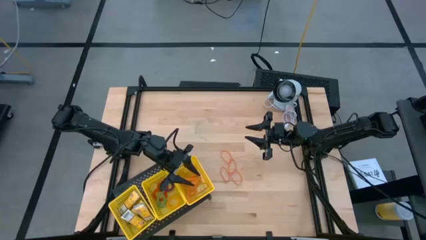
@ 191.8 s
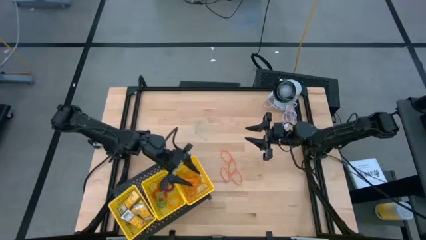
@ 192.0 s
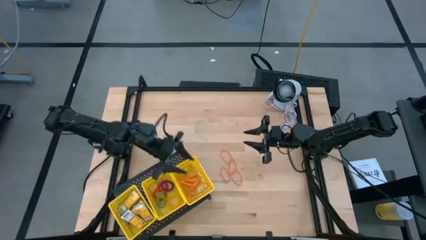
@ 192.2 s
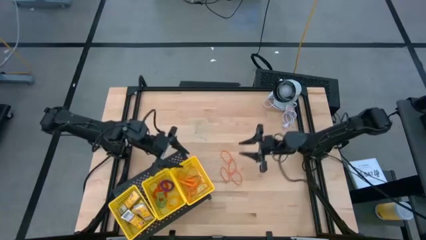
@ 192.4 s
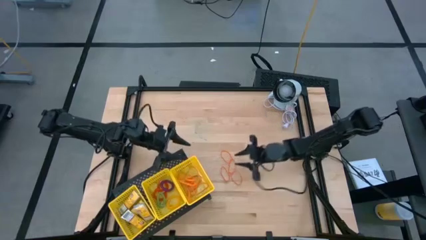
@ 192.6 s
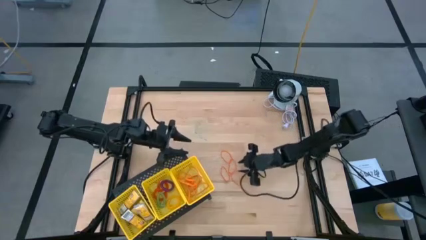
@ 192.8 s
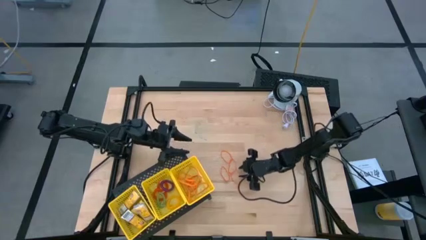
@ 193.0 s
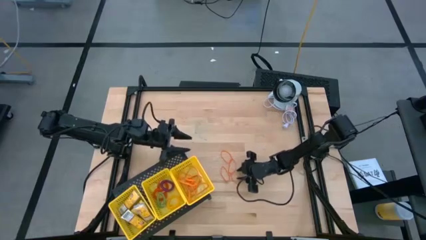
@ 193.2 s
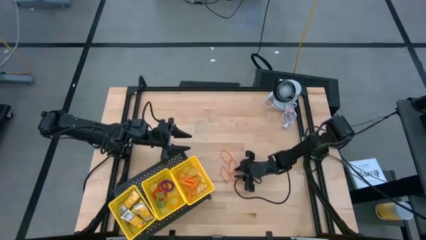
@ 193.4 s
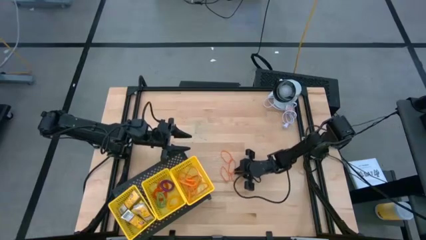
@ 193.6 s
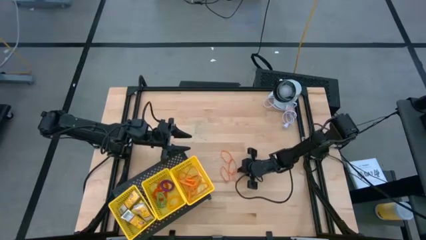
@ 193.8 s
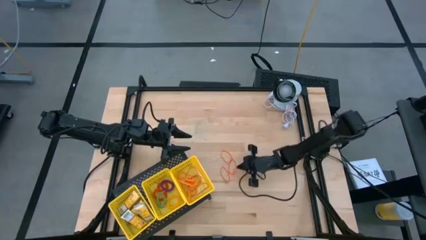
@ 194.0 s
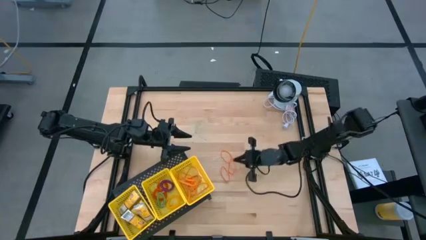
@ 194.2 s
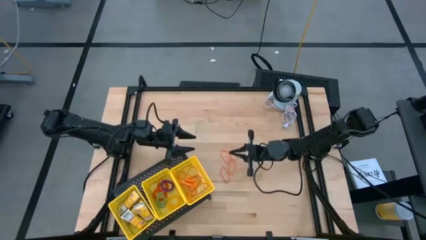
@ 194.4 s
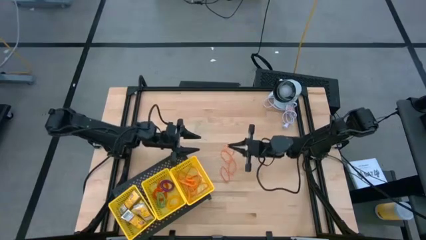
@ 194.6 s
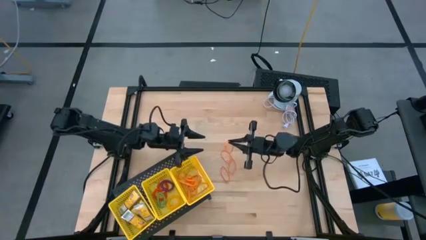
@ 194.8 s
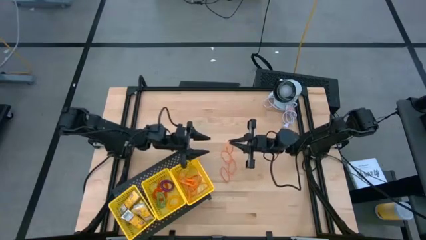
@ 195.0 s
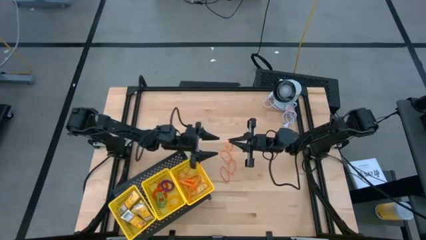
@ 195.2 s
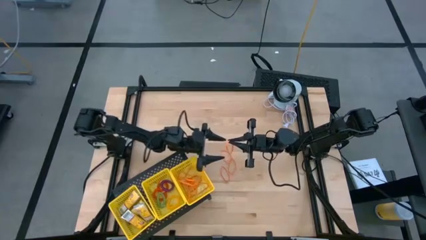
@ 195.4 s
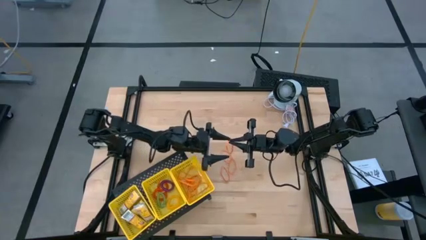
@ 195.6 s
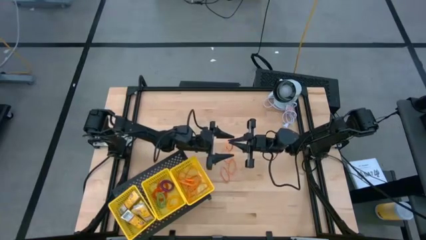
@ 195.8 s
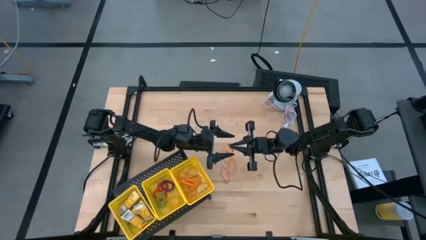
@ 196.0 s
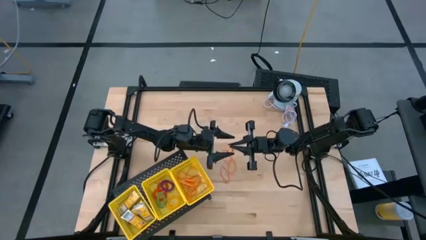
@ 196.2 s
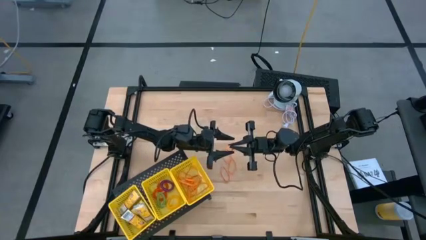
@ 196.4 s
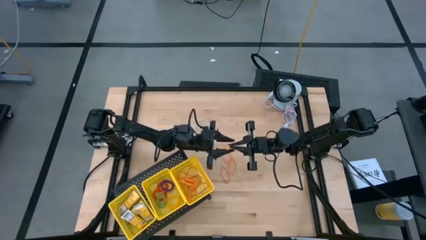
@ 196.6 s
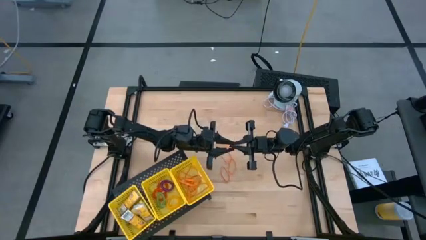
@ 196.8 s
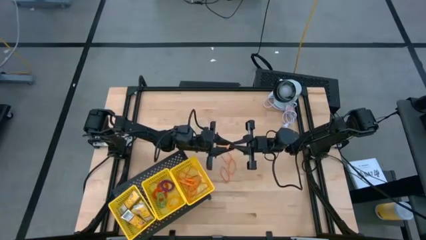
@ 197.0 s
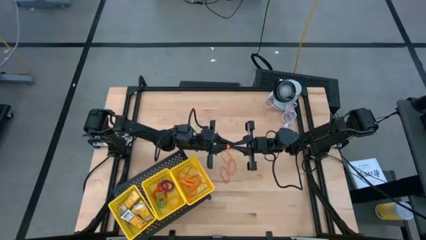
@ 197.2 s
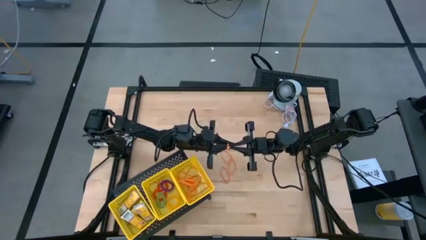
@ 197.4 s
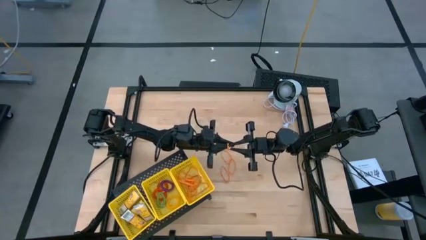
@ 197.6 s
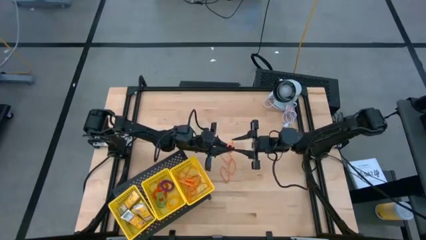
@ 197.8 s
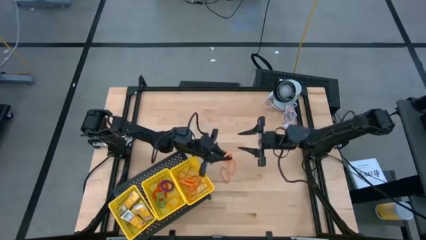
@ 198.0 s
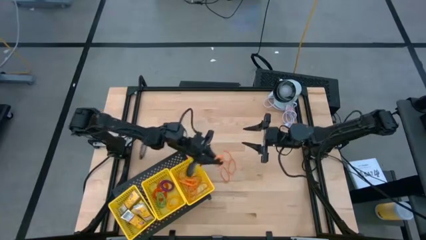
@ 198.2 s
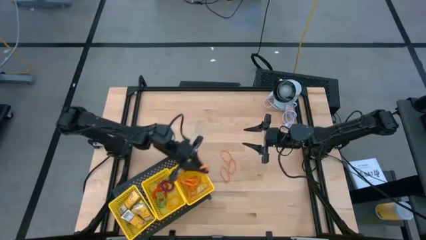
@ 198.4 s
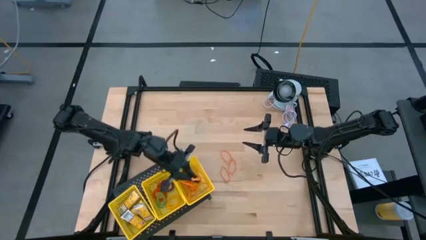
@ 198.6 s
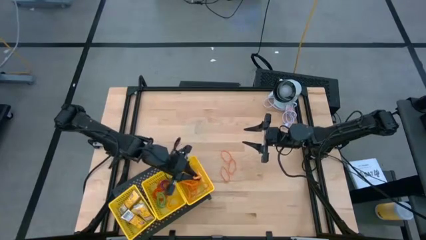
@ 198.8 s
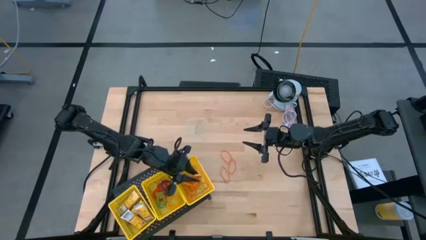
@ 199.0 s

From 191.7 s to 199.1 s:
Task: Pick & Place Office Desk Supplies
Put the orange rubber band into the right yellow bin on the shelf

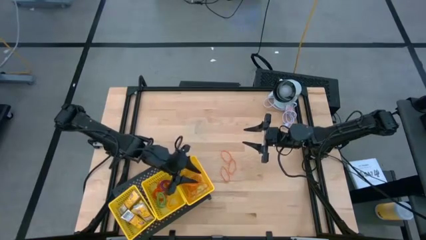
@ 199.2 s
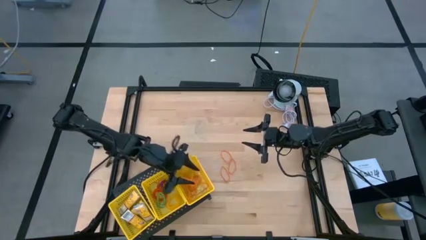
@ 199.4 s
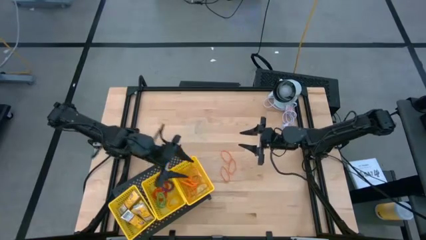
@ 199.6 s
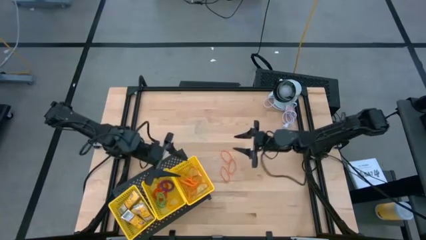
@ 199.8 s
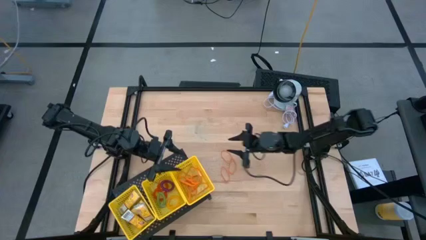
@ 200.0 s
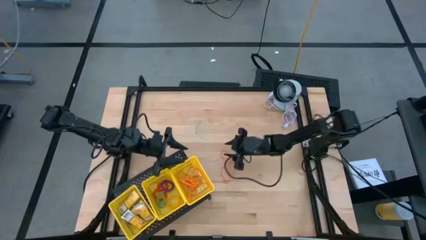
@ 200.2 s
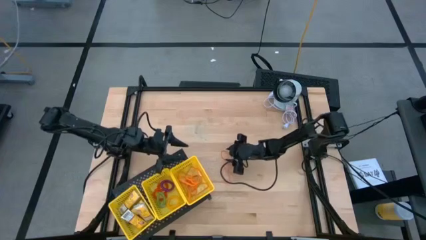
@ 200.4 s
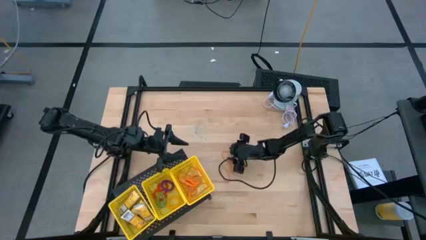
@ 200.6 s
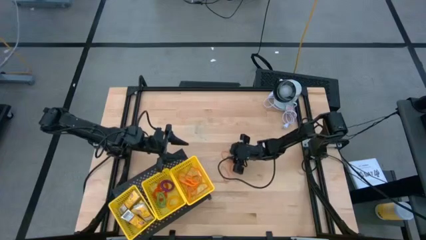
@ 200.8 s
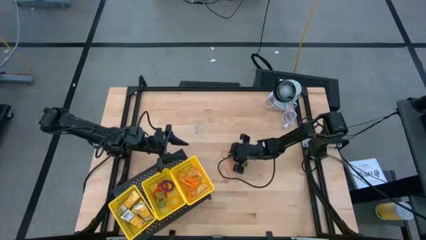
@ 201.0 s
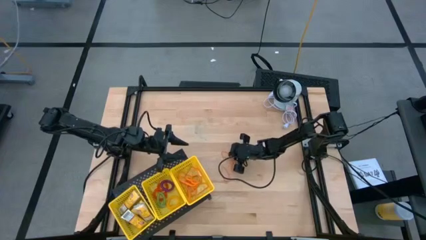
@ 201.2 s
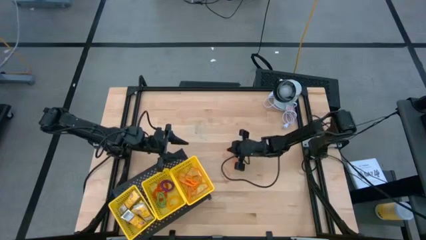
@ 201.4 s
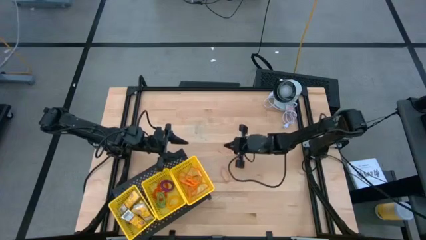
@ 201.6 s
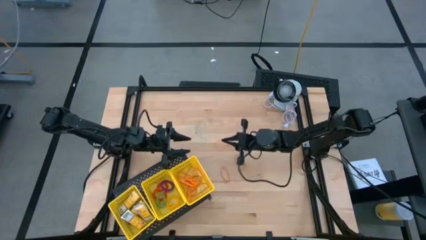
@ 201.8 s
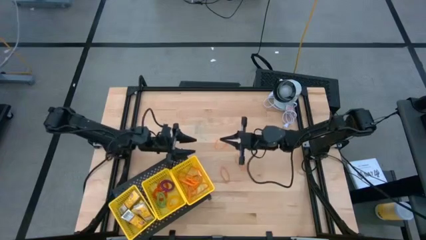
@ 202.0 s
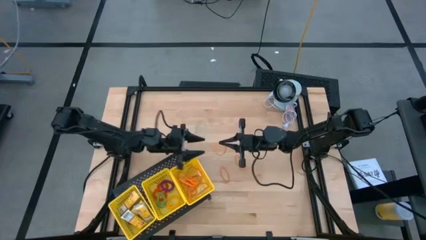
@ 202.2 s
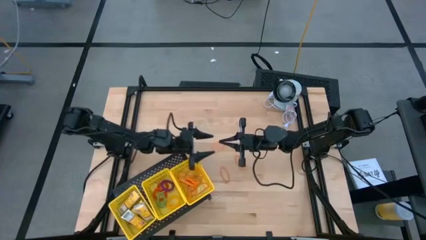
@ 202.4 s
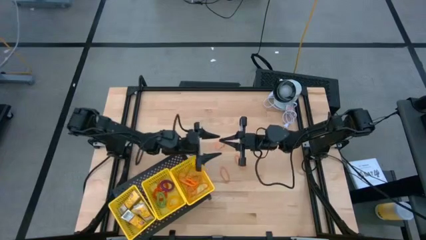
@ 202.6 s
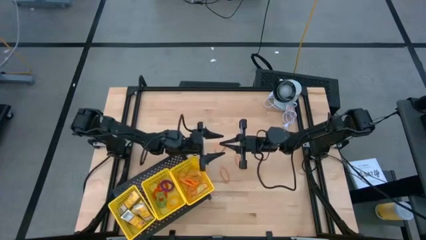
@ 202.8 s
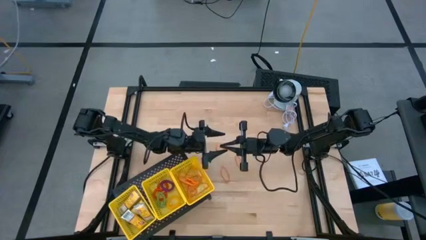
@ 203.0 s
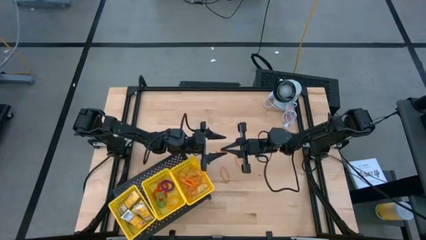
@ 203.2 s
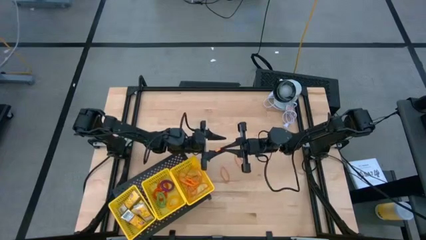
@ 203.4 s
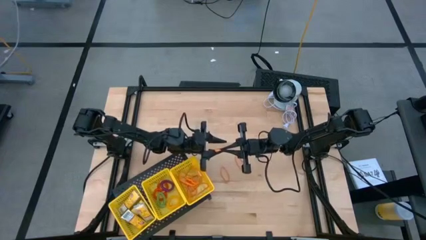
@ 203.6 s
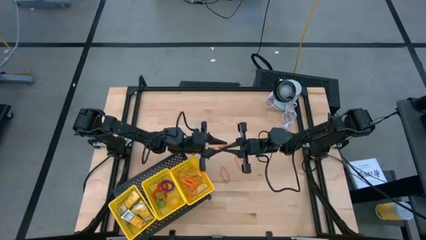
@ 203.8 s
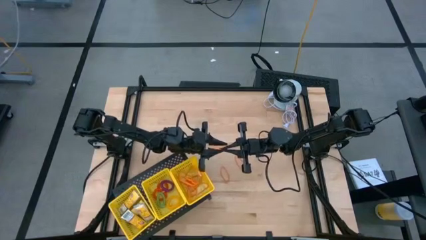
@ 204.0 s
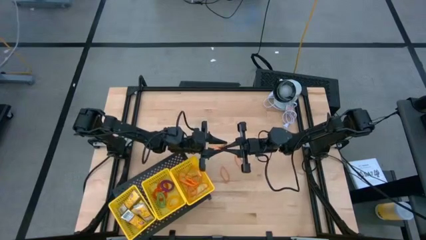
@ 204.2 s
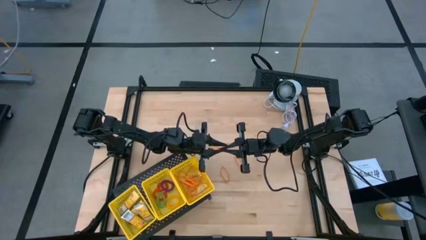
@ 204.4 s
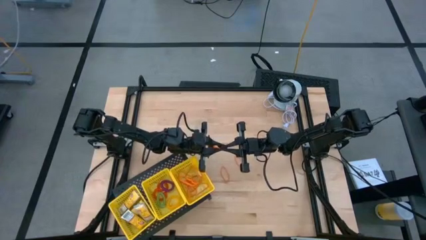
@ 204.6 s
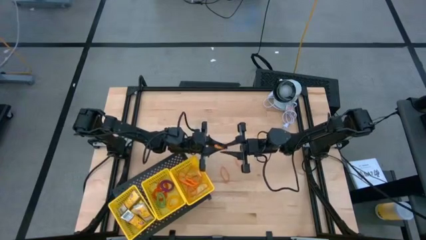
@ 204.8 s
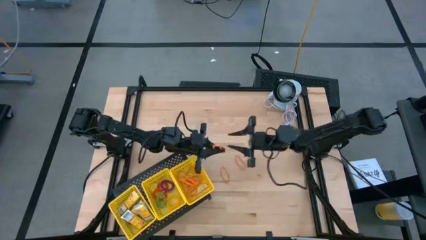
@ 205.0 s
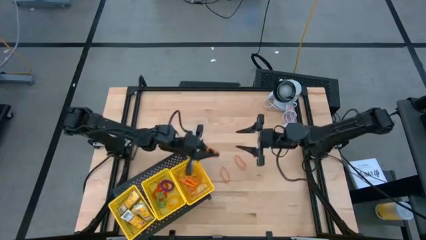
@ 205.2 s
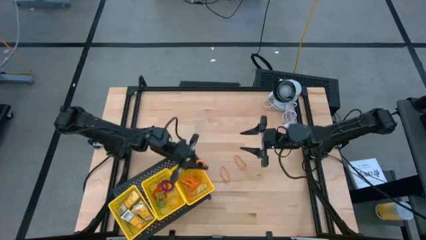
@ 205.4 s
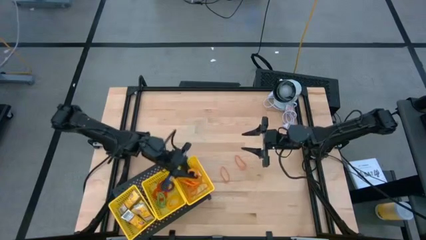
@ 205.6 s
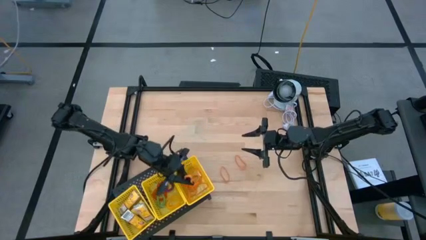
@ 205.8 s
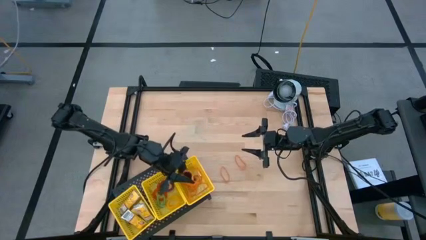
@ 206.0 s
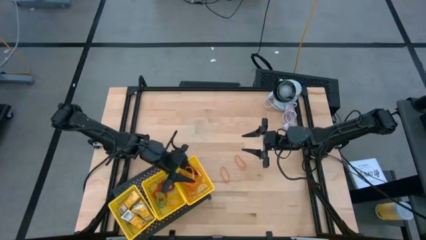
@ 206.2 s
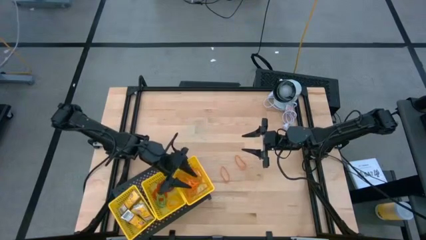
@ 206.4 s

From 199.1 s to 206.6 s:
Put the orange rubber band into the right yellow bin on the shelf
